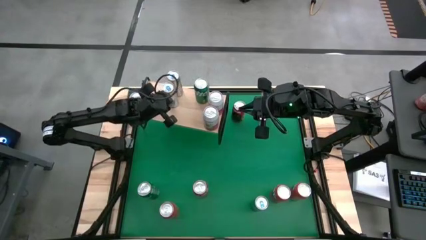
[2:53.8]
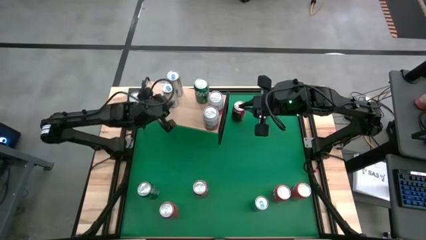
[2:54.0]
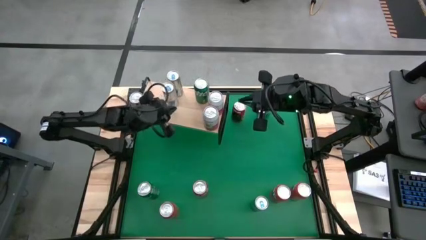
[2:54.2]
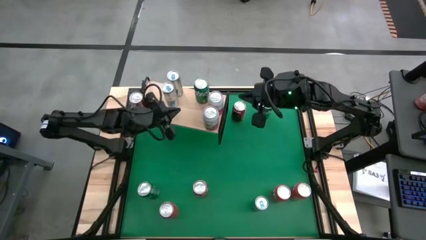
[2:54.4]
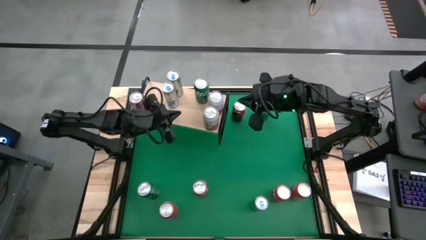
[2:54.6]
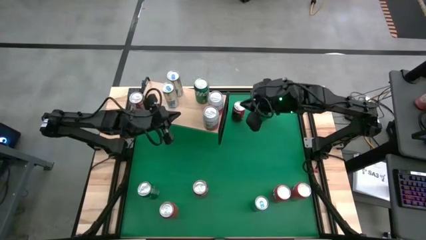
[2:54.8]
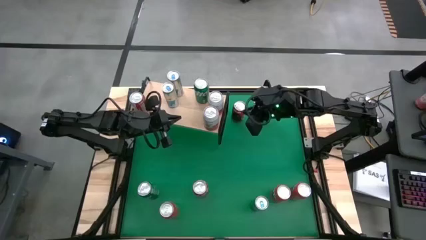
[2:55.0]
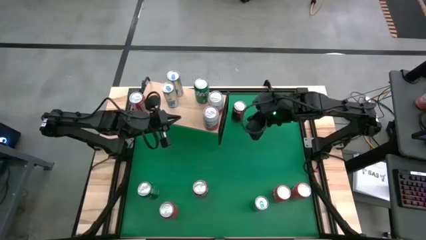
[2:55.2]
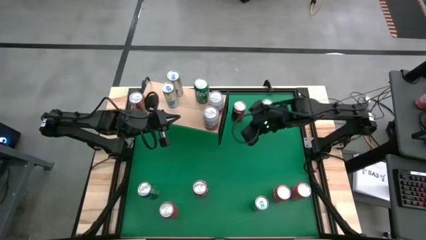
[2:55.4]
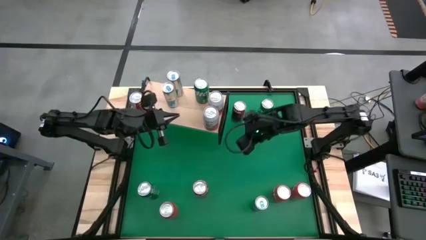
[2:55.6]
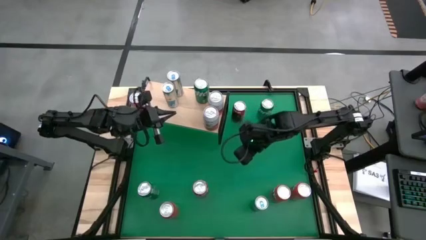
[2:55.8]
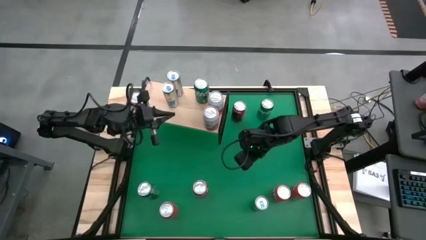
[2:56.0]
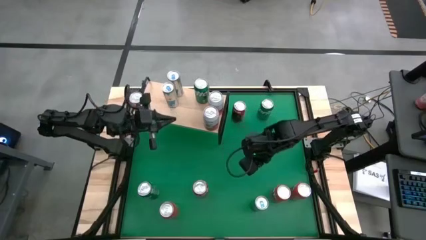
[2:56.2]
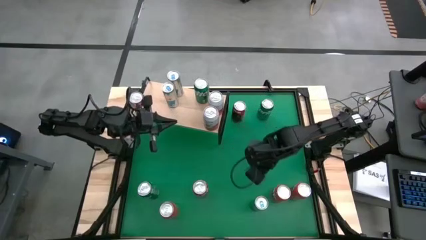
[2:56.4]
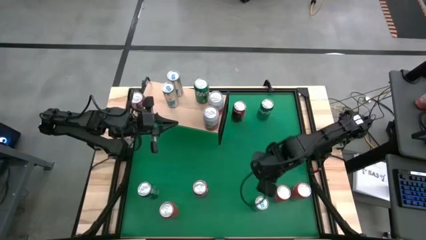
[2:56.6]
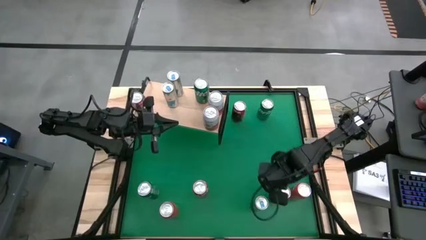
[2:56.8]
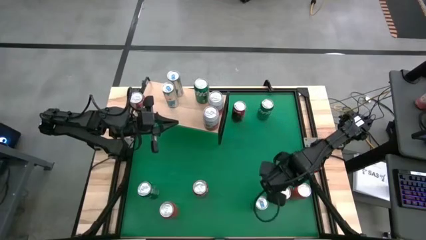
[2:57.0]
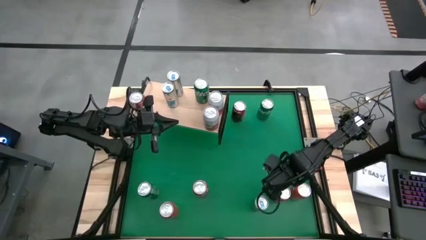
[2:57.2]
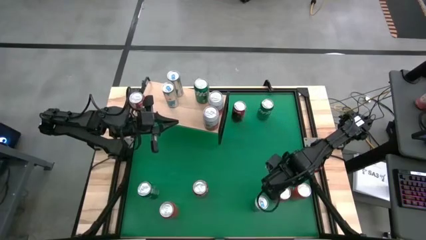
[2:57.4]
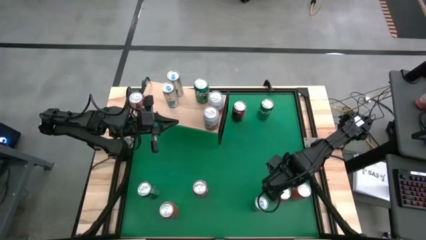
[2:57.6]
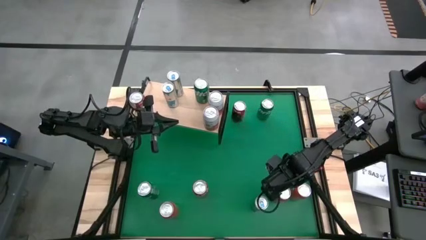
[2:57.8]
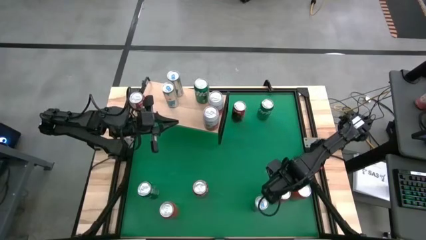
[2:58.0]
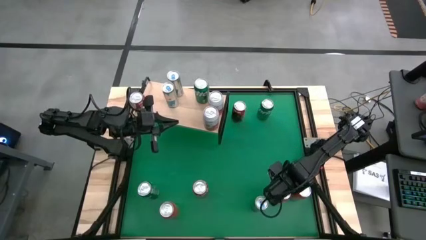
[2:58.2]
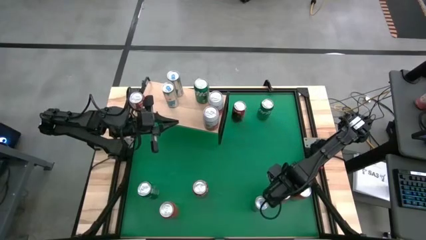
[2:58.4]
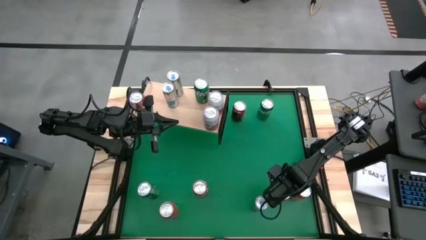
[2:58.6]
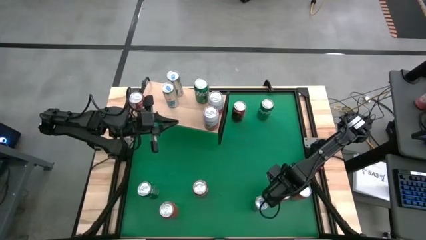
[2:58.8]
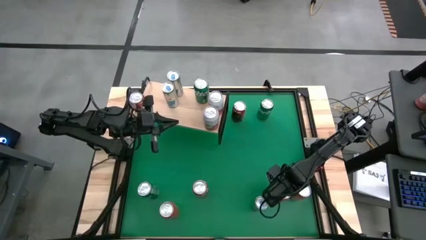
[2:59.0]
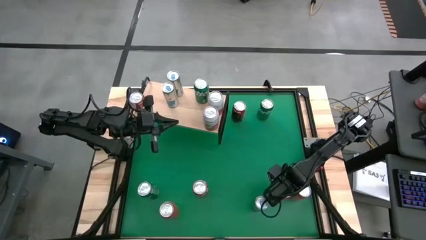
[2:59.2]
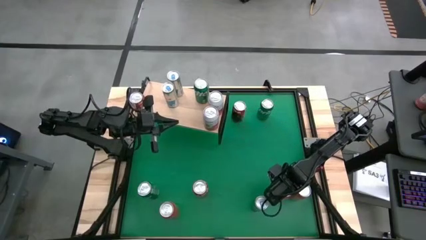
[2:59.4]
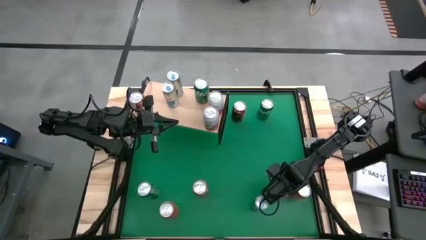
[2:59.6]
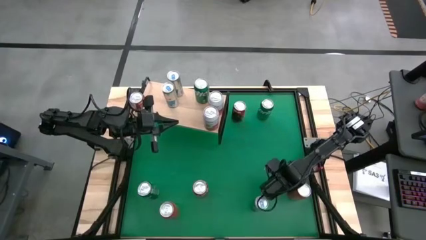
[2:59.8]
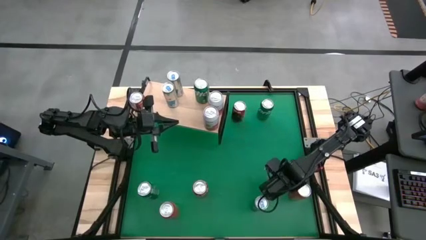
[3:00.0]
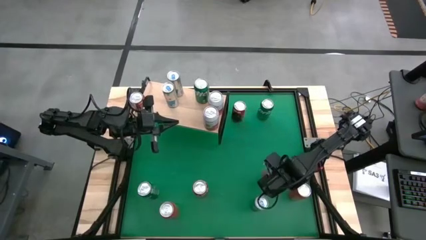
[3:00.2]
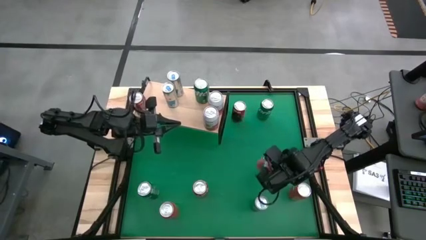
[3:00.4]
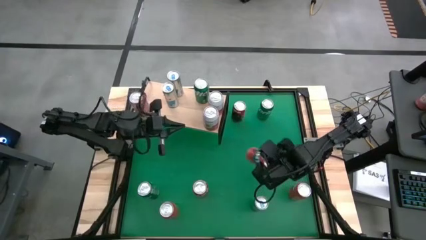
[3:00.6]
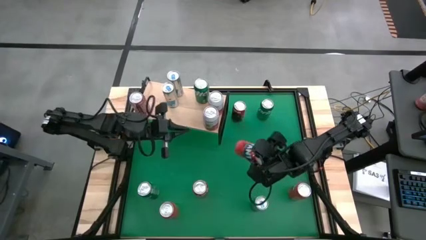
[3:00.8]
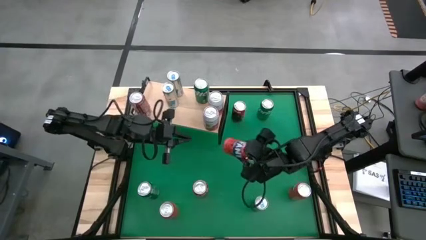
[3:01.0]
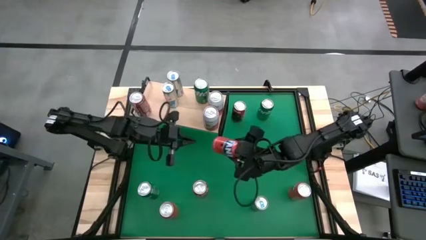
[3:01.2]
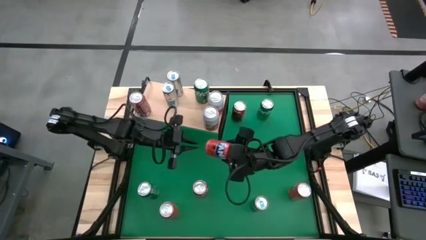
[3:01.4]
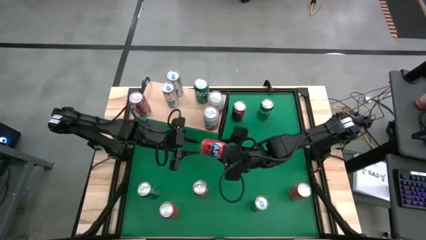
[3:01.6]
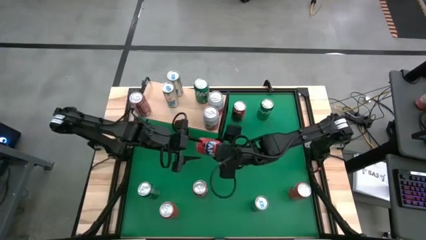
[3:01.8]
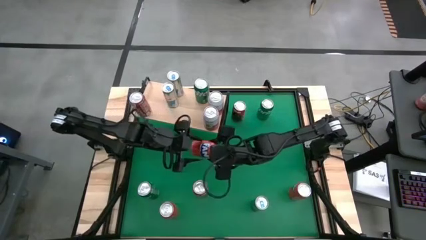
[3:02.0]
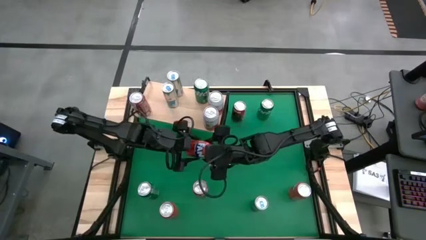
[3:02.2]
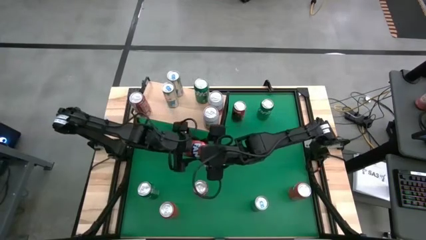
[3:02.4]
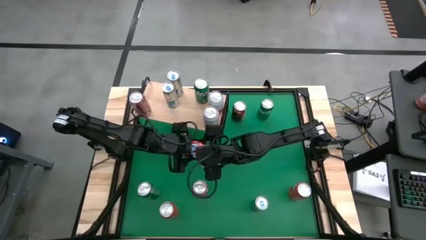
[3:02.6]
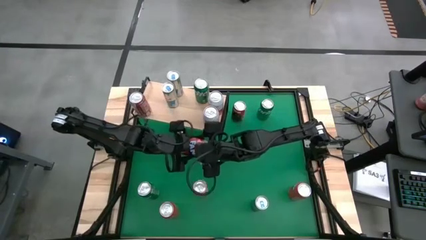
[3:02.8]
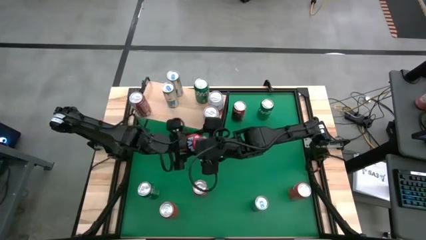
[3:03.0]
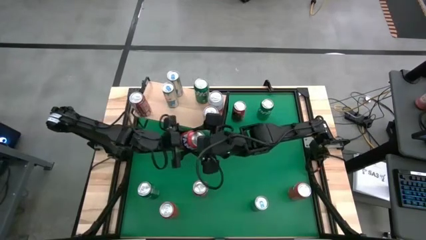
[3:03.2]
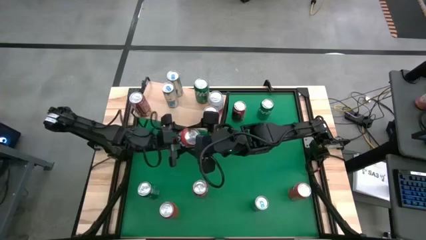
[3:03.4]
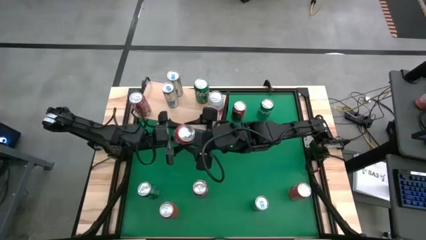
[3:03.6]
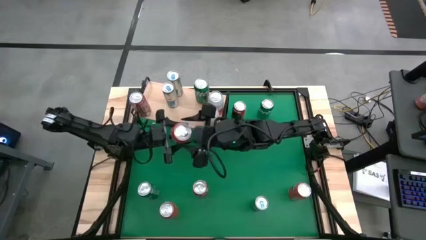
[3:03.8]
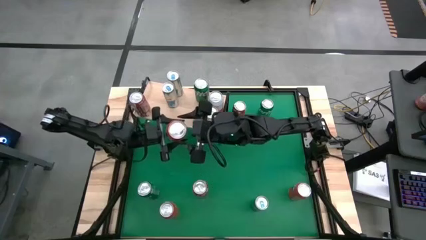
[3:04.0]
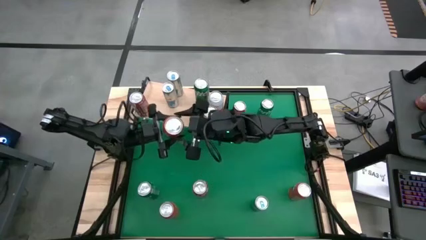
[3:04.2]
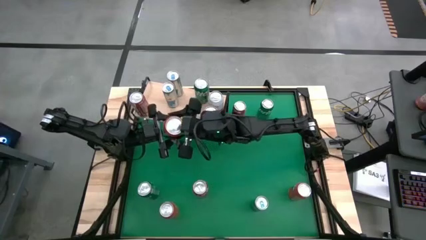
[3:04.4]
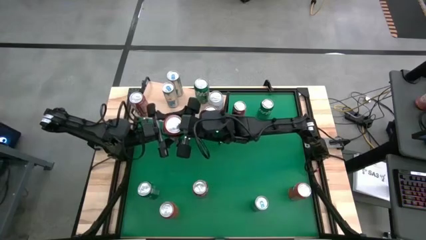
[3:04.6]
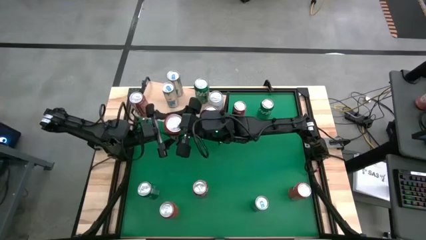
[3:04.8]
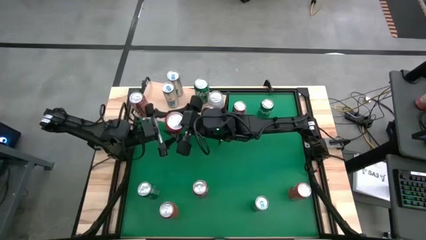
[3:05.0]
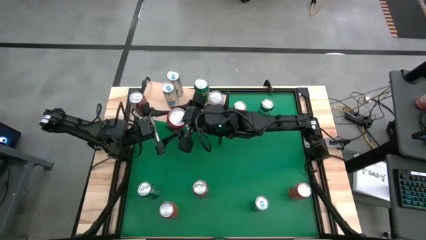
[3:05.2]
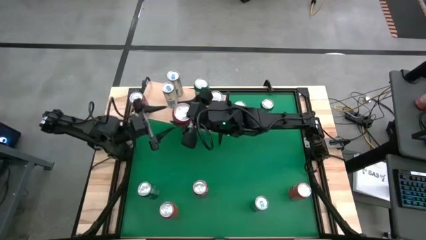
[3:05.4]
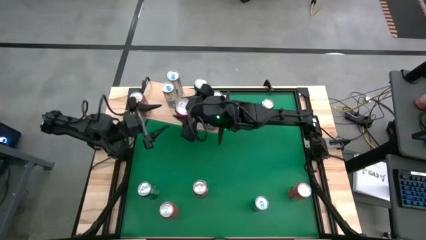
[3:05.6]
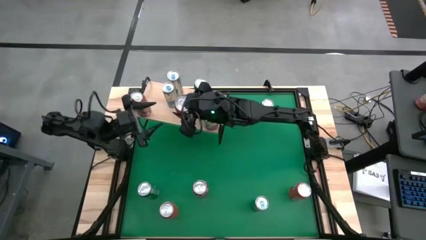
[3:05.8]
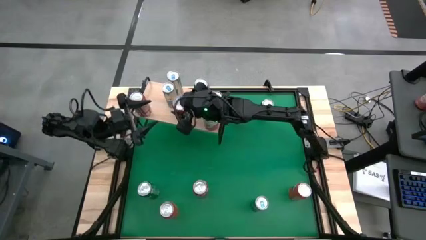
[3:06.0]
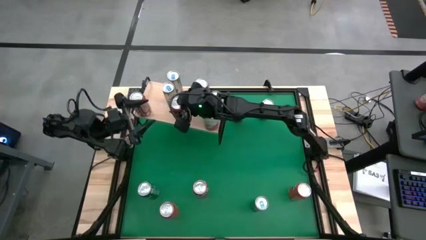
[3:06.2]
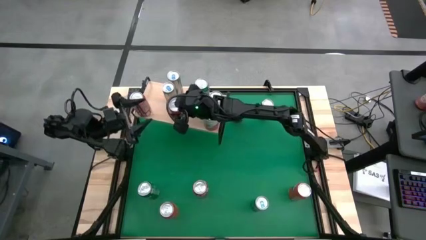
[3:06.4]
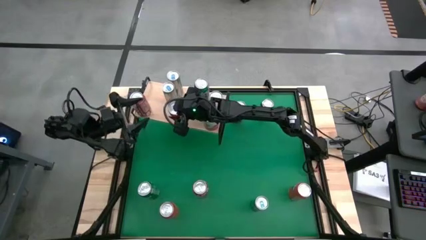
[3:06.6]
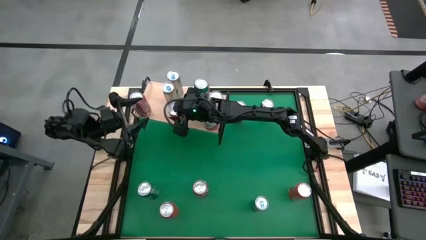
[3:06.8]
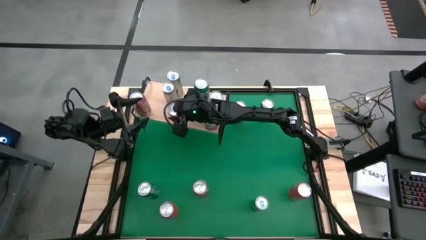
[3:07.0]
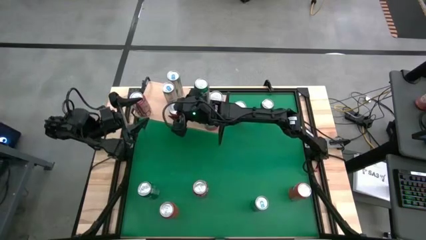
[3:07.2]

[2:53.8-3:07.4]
Task: Place canned beverage on shelf
Put the red soda can on the shelf

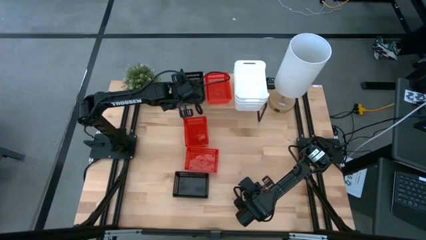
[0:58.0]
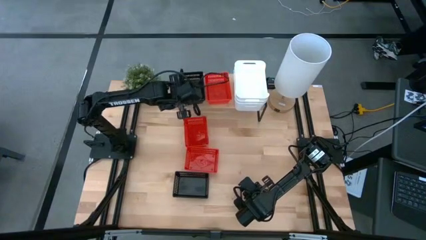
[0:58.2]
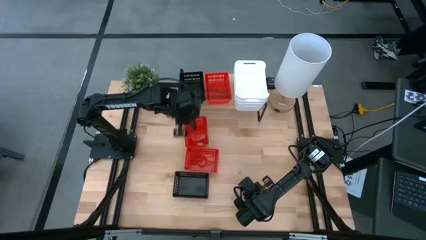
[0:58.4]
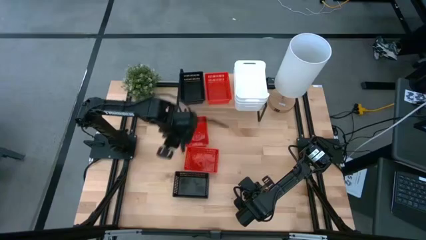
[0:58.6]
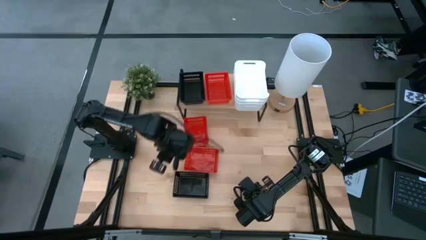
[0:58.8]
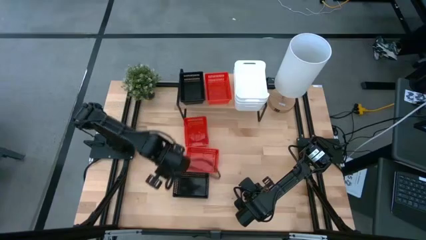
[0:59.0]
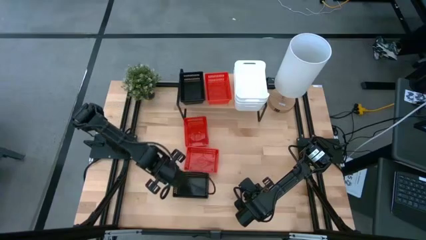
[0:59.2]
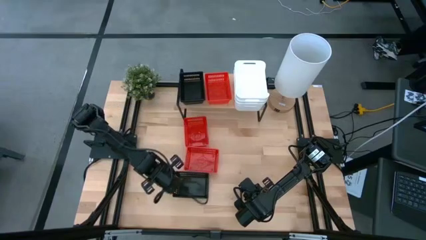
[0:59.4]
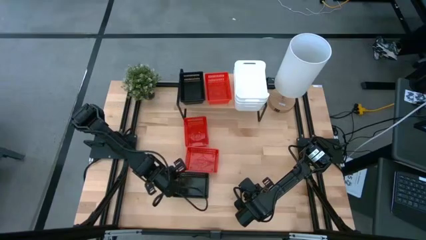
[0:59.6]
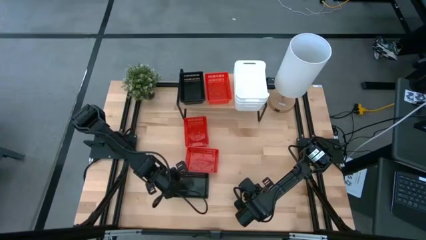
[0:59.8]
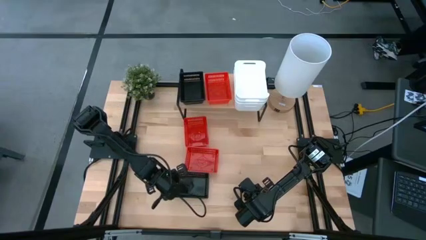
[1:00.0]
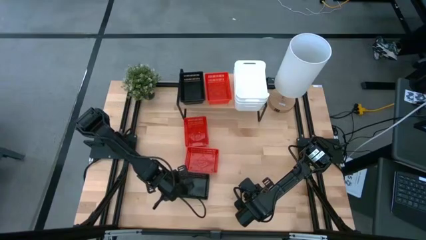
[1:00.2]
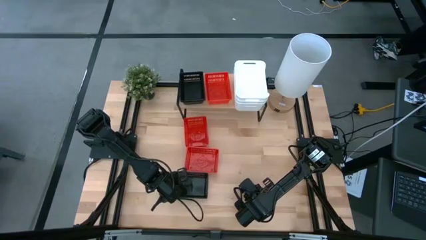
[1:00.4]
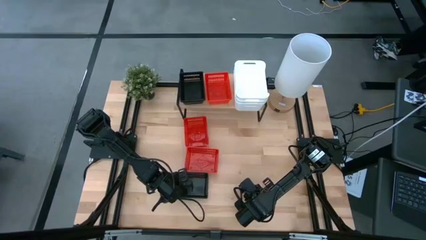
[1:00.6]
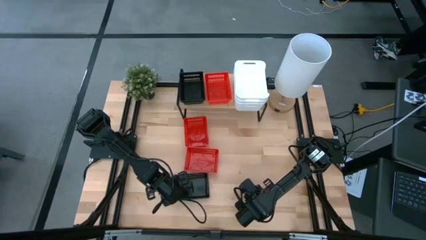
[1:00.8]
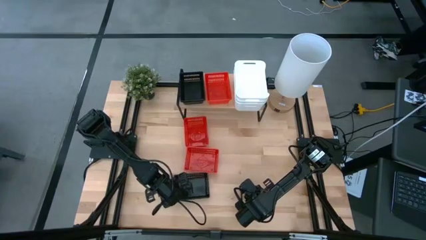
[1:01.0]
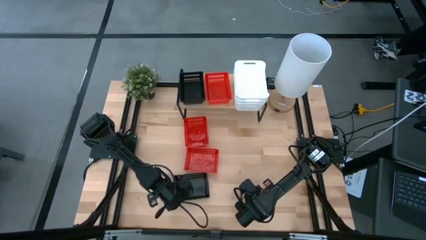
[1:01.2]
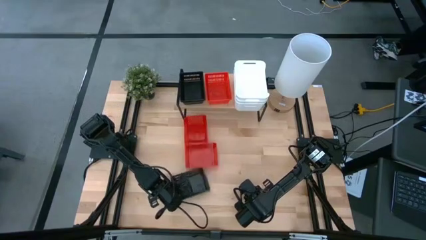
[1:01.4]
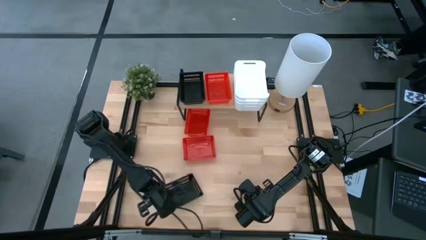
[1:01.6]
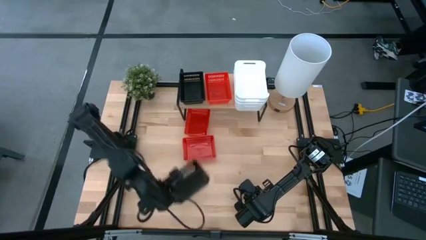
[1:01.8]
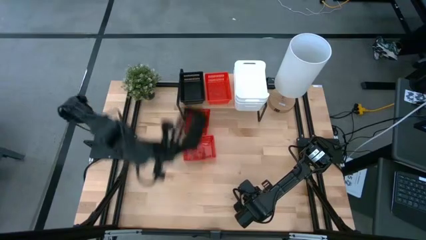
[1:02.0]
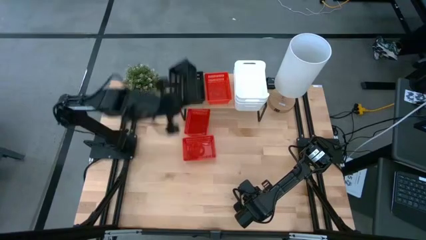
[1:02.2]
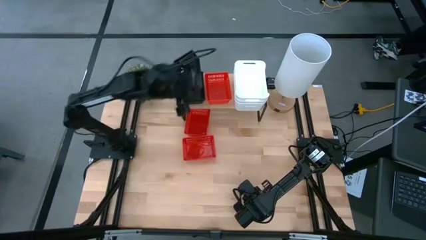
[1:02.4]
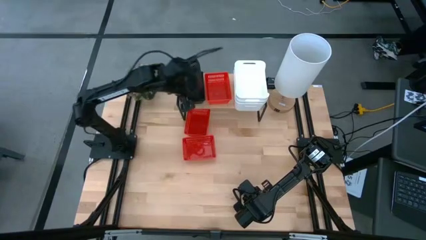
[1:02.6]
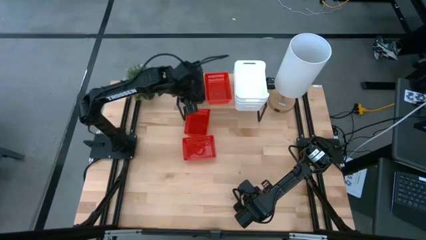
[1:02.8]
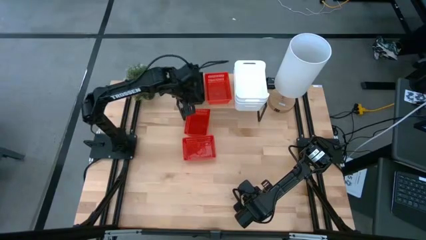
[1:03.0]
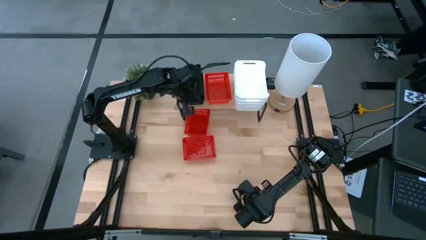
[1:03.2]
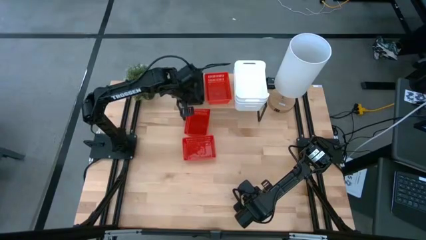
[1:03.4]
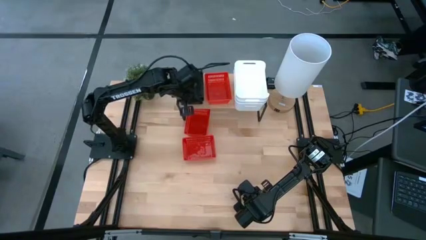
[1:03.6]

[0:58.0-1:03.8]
Task: Stack baskets on shelf by color
Stack the black bin on top of the stacked black bins on the shelf
